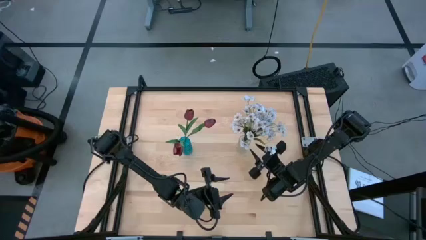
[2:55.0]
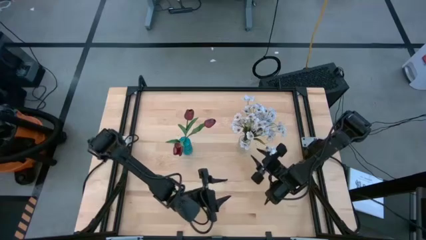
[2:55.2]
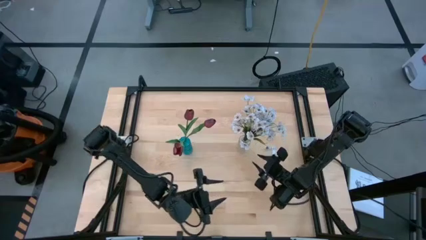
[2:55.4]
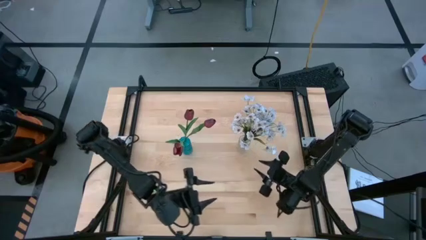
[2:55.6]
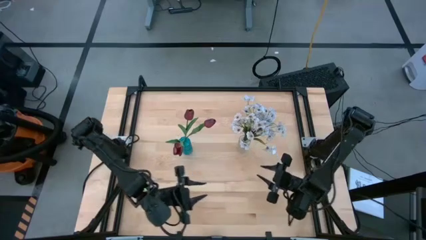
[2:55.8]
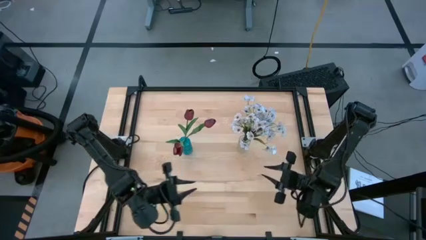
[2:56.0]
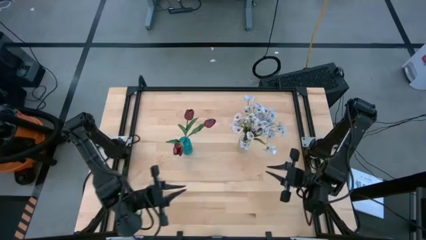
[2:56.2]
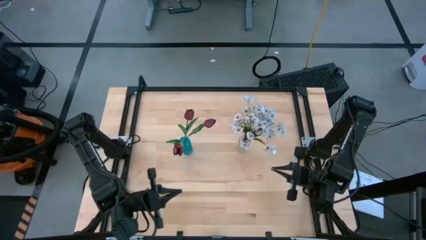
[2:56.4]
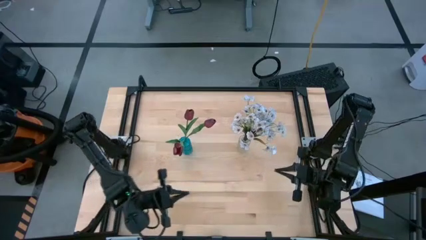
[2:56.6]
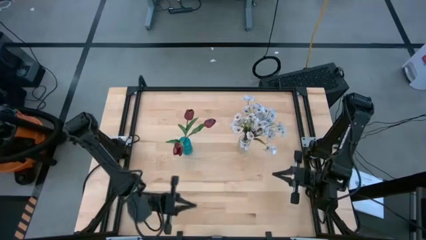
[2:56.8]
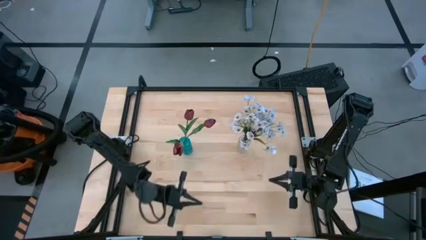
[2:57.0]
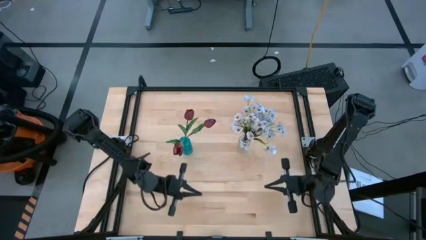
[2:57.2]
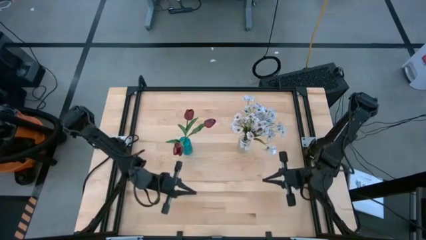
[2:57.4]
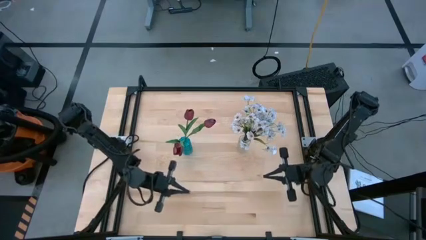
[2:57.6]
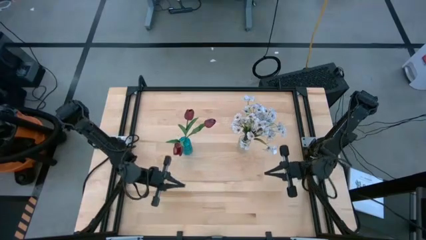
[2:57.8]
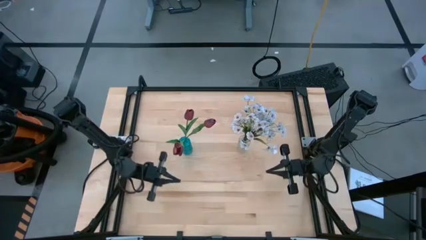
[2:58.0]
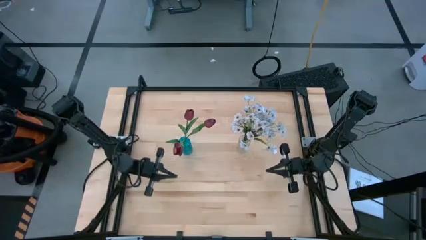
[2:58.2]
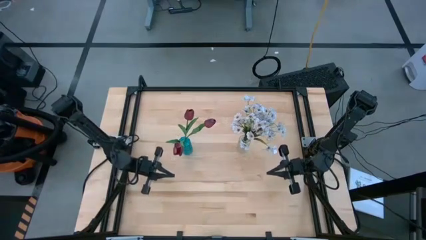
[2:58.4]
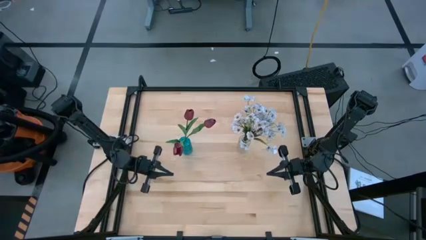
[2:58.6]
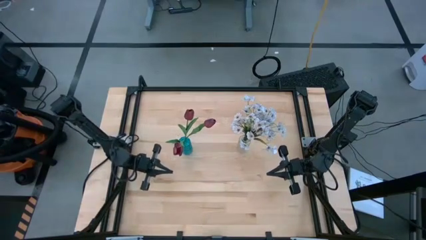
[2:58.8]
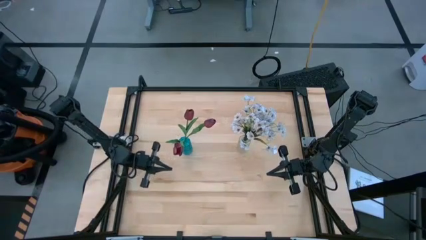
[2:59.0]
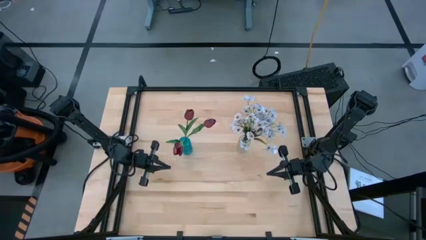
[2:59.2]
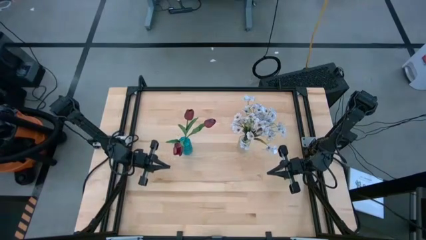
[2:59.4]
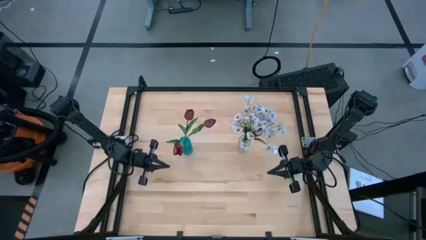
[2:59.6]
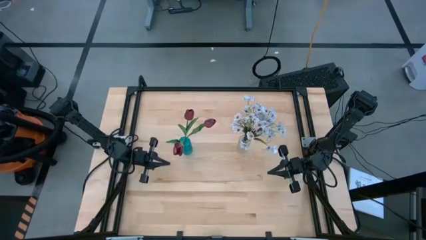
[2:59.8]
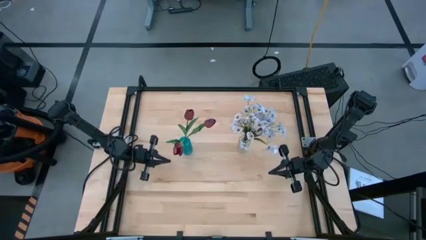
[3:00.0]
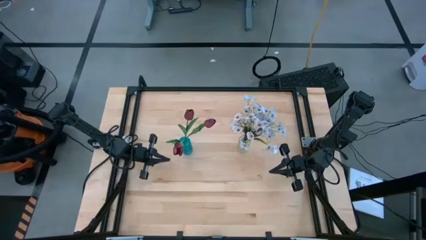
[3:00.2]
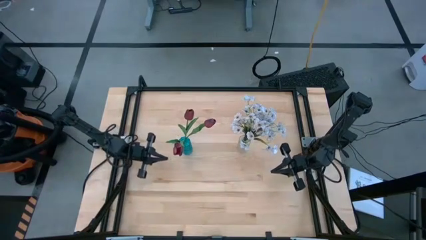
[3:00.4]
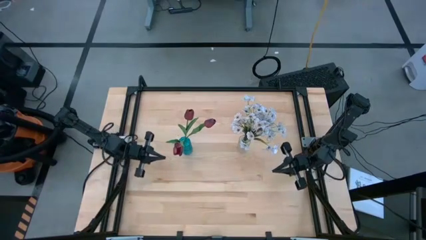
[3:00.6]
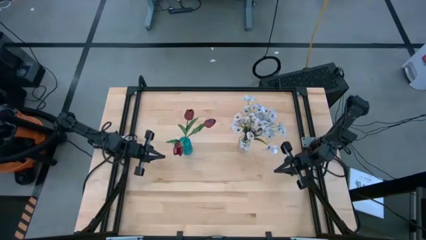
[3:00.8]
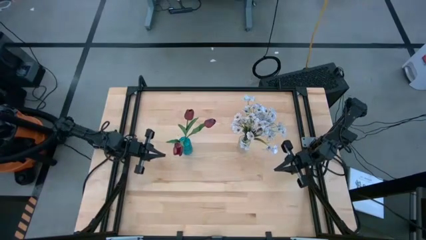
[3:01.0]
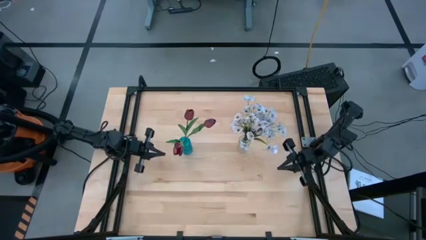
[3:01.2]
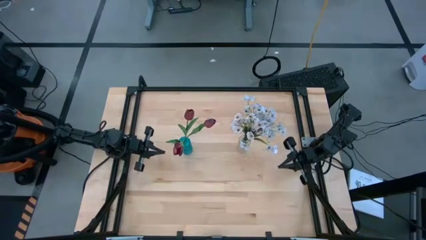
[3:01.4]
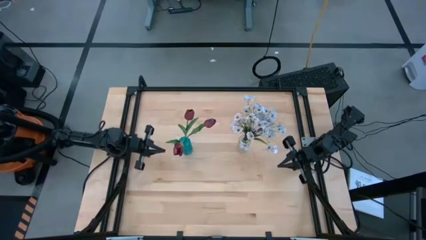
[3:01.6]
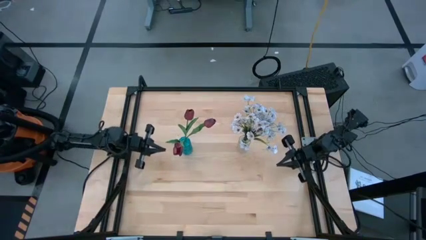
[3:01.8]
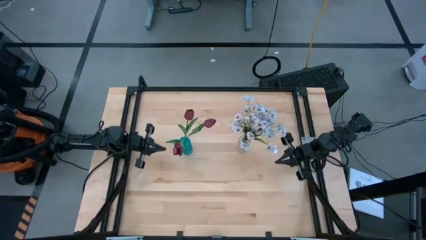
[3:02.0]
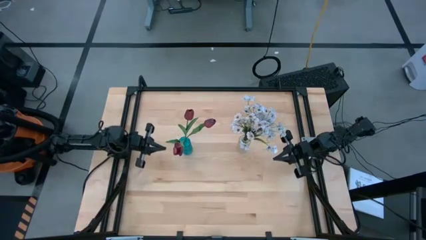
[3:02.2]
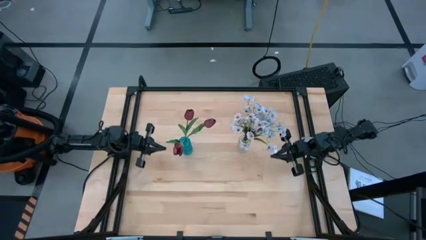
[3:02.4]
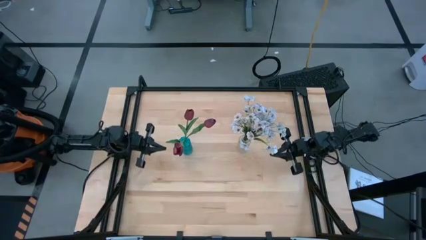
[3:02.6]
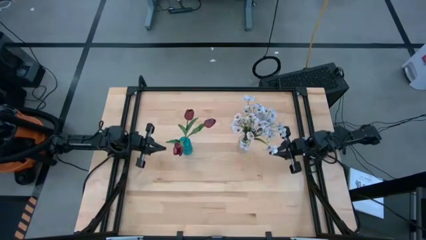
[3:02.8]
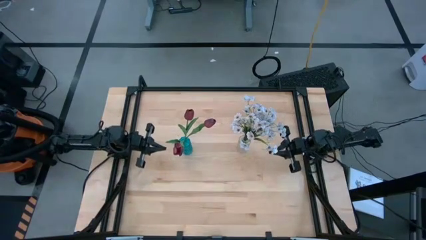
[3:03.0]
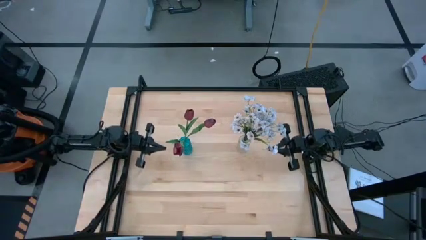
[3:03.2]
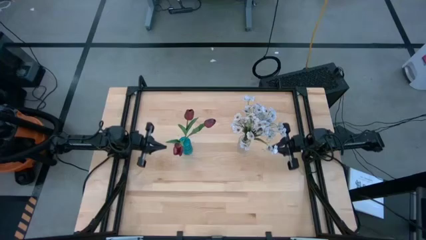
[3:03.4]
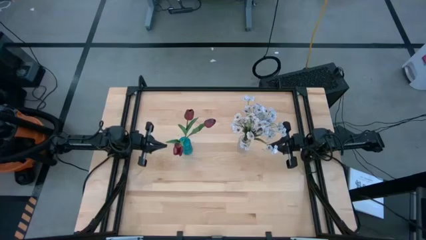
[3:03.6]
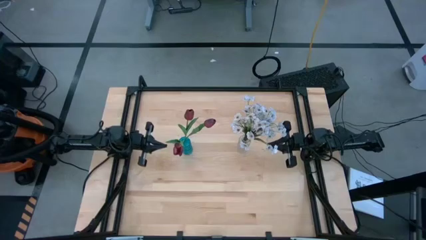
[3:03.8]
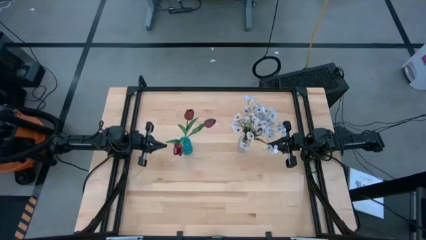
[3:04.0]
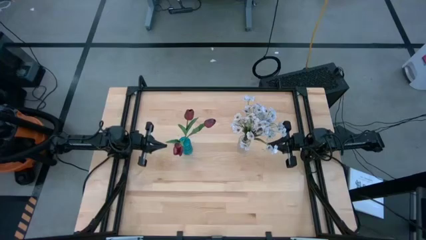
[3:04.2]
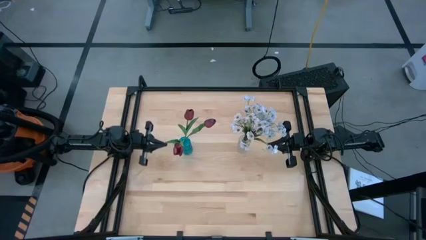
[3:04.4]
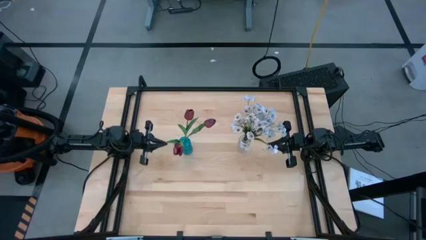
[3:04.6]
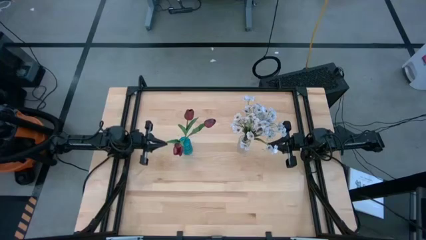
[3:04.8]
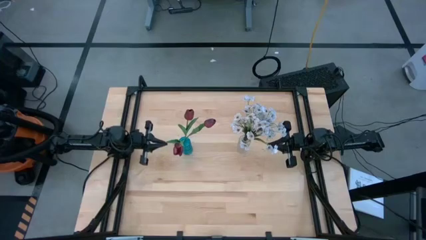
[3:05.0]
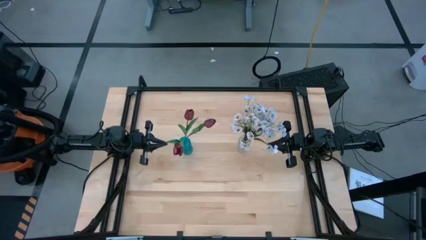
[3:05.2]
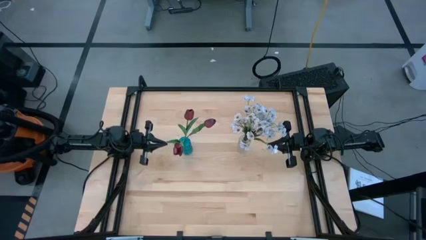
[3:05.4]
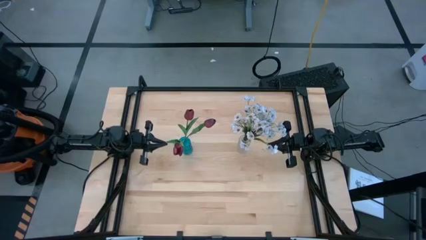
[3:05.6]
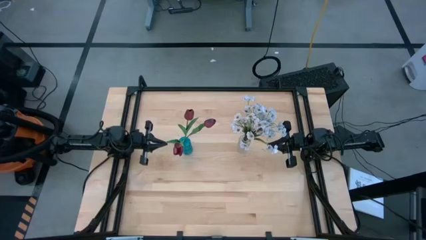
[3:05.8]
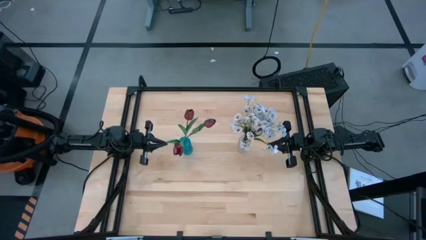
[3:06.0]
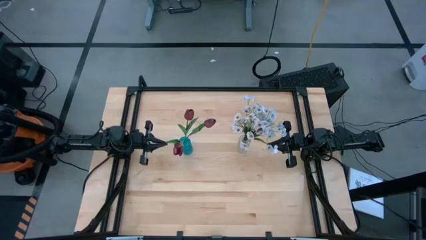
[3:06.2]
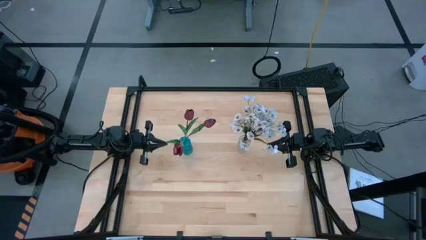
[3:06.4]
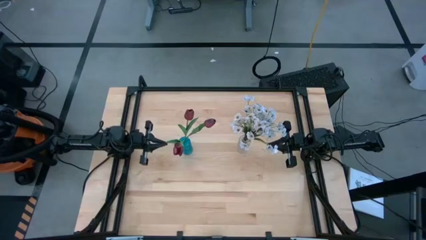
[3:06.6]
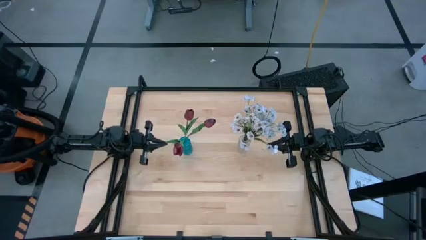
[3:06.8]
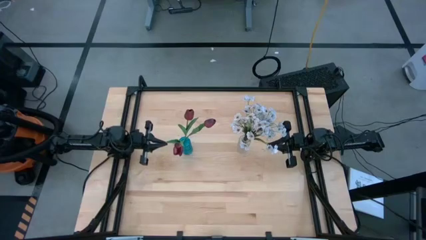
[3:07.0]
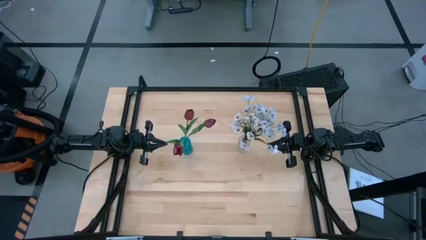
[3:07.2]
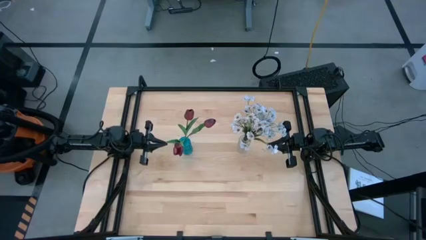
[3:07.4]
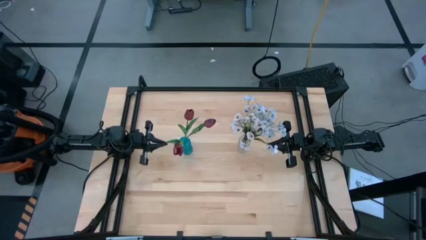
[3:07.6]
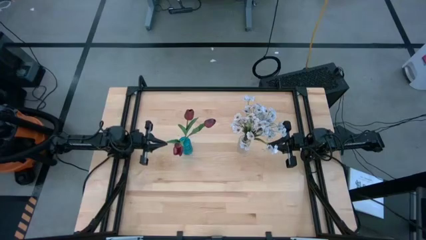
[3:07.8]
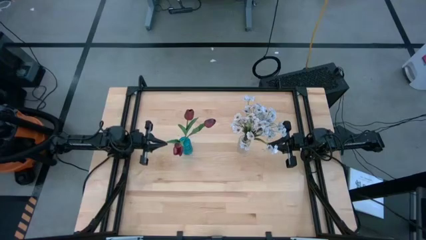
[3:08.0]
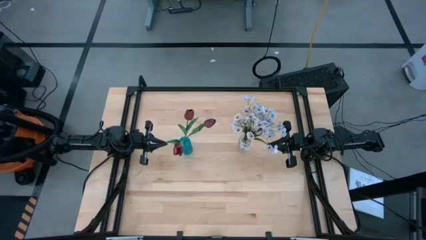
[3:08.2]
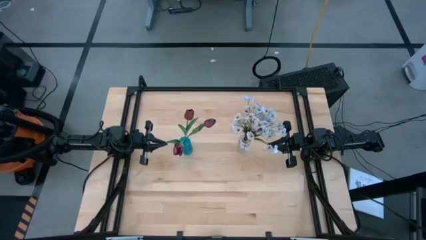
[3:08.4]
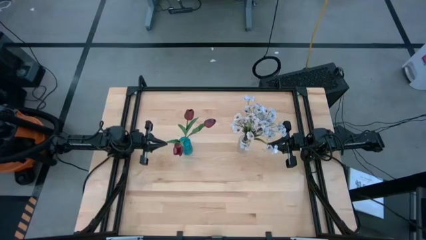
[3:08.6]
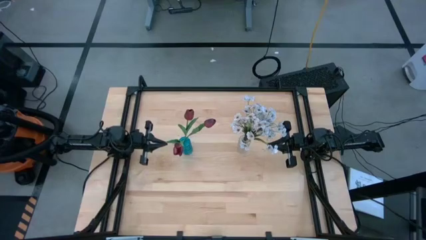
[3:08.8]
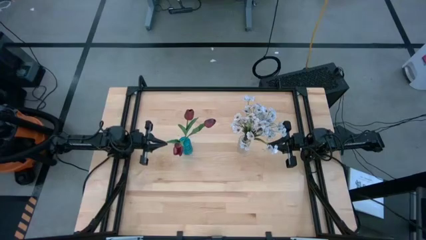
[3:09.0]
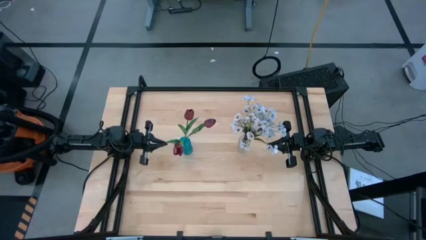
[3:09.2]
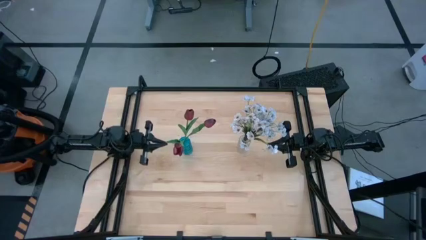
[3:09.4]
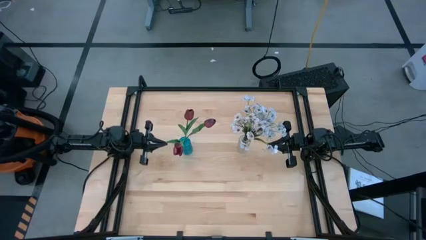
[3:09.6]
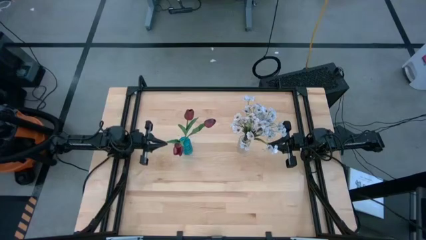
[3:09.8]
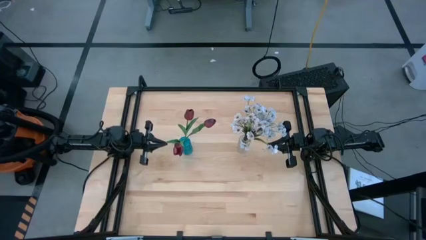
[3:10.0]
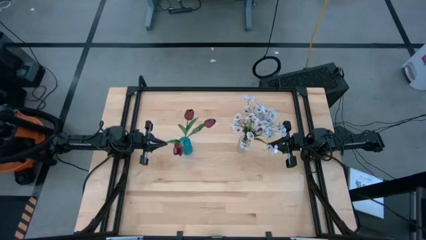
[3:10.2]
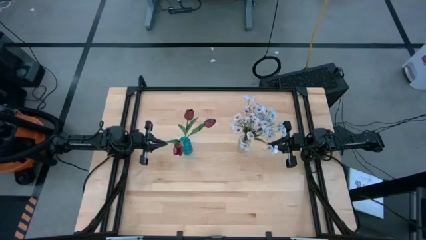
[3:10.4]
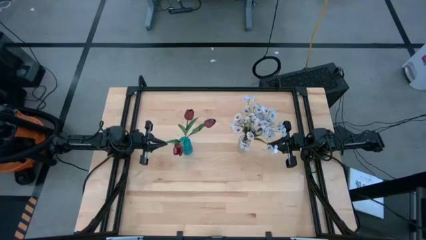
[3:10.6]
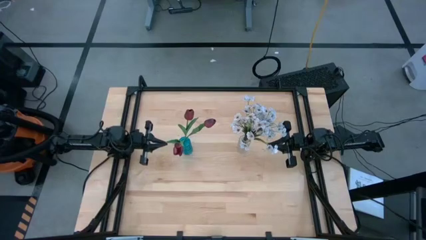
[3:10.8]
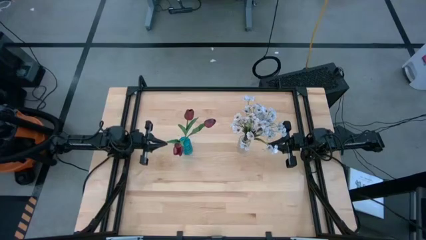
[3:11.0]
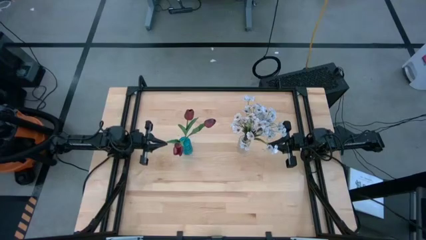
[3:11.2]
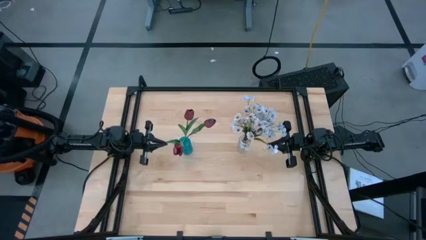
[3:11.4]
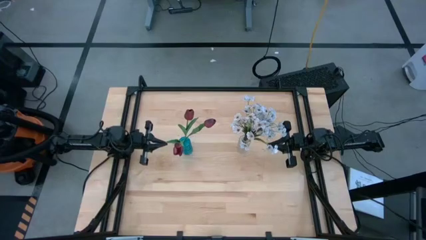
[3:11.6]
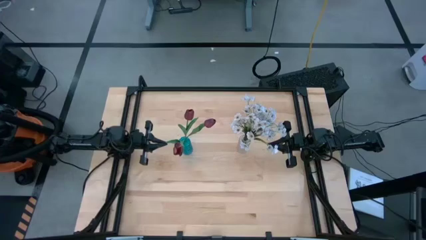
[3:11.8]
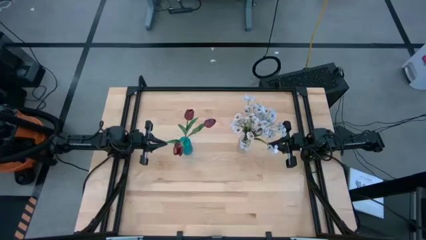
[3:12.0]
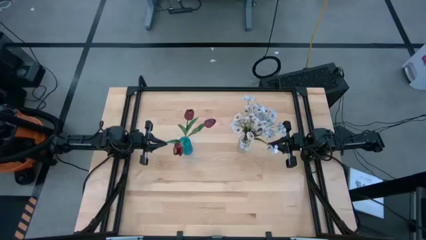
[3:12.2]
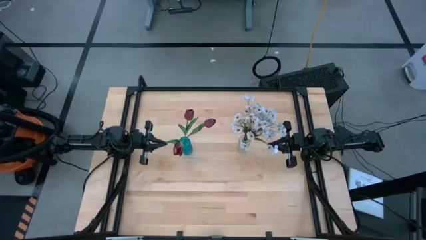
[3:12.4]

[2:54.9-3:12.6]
Task: Sort flowers into vase by color
Return to Home Position
